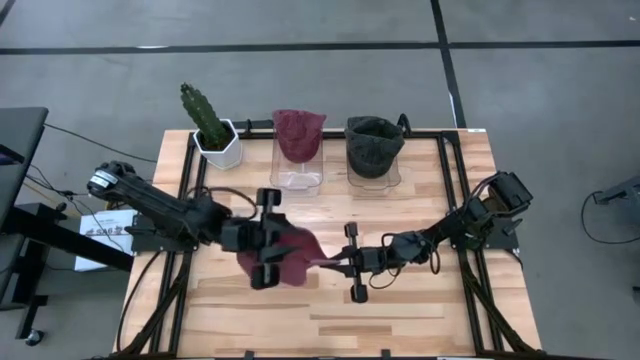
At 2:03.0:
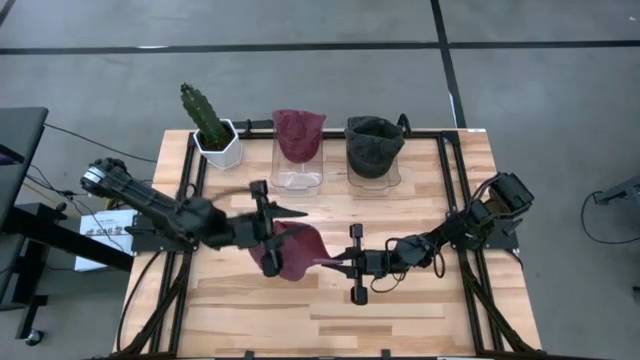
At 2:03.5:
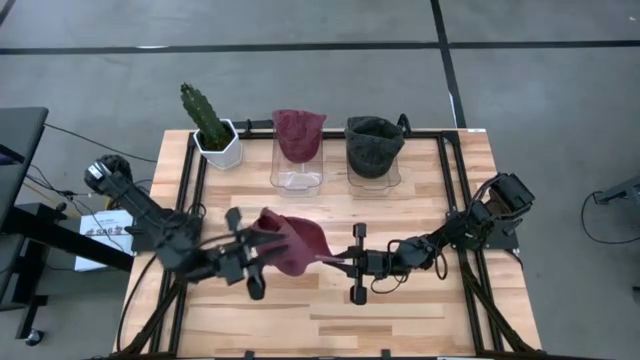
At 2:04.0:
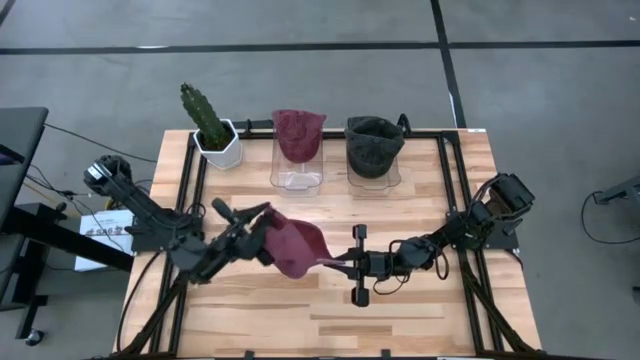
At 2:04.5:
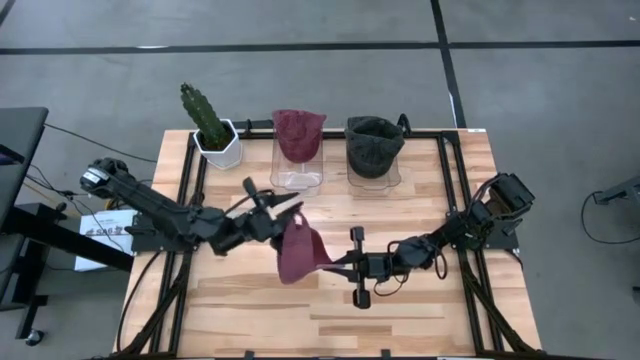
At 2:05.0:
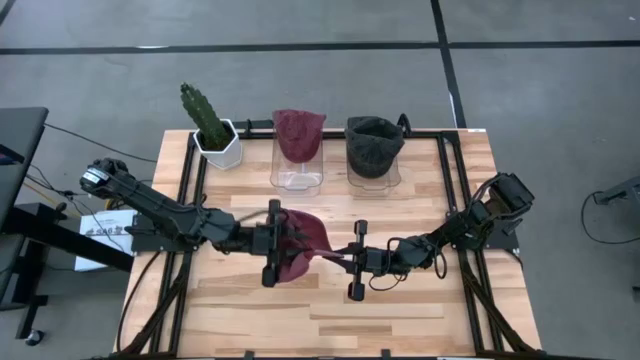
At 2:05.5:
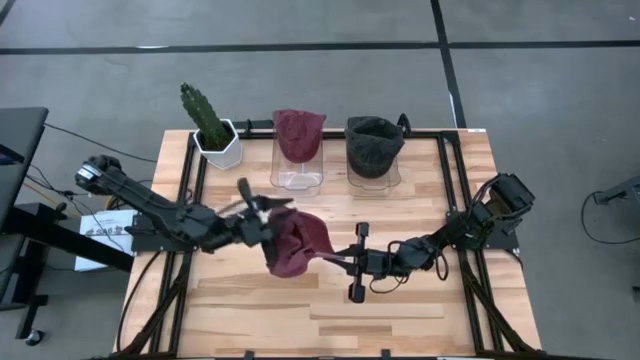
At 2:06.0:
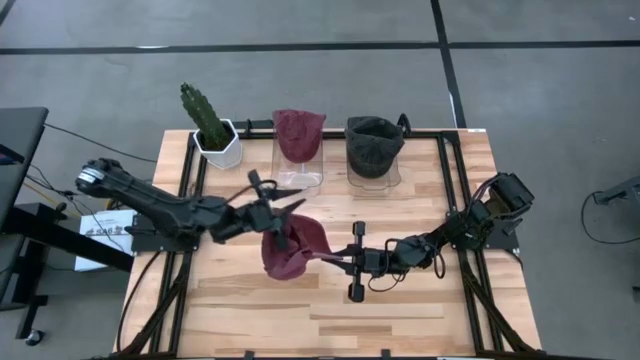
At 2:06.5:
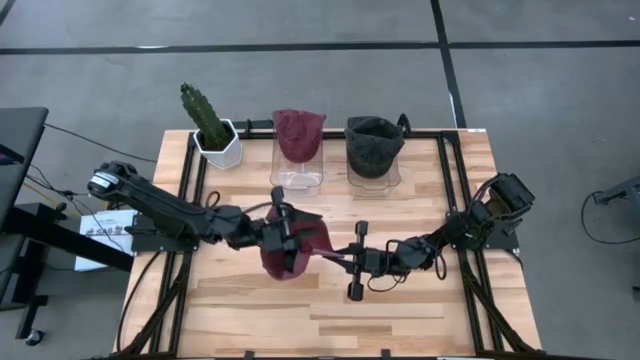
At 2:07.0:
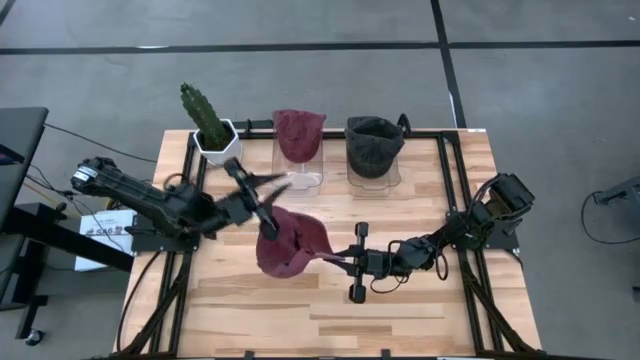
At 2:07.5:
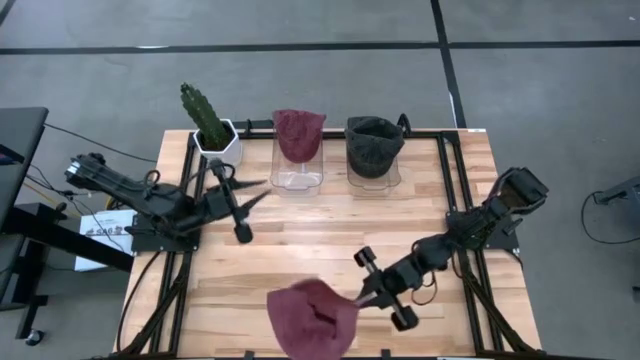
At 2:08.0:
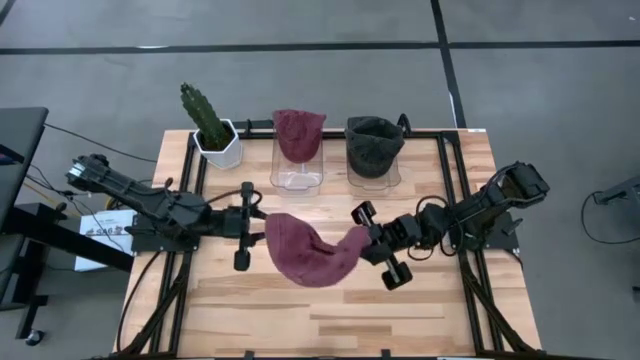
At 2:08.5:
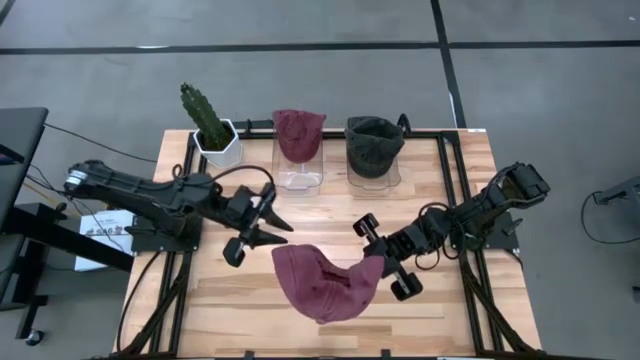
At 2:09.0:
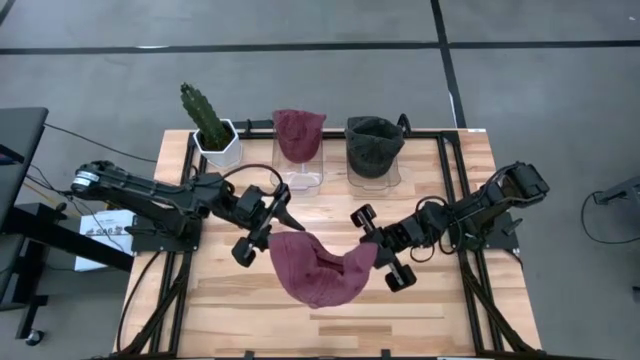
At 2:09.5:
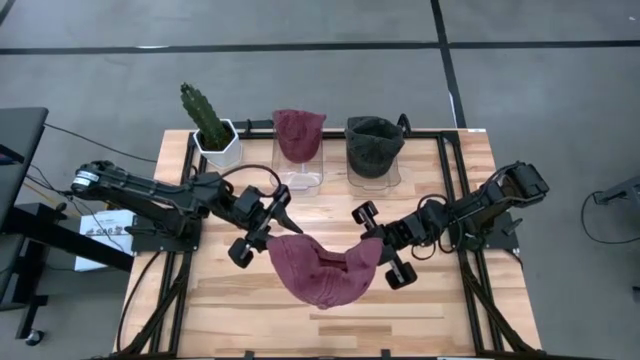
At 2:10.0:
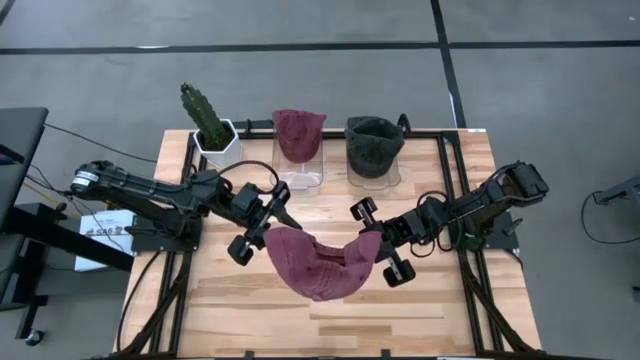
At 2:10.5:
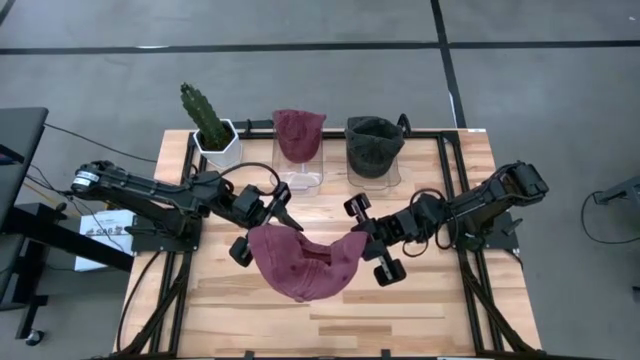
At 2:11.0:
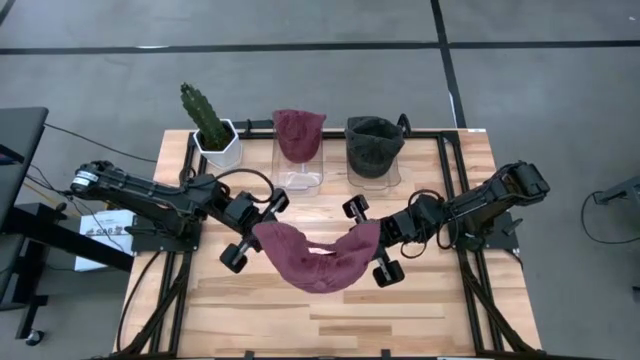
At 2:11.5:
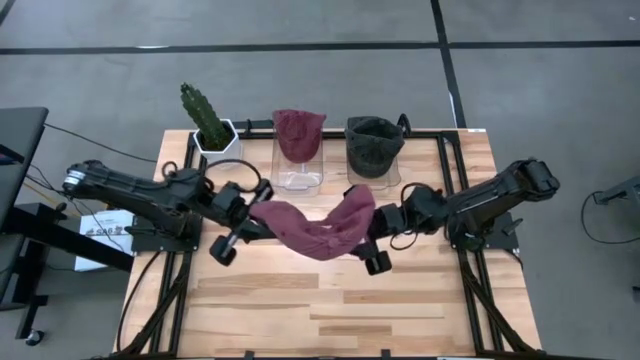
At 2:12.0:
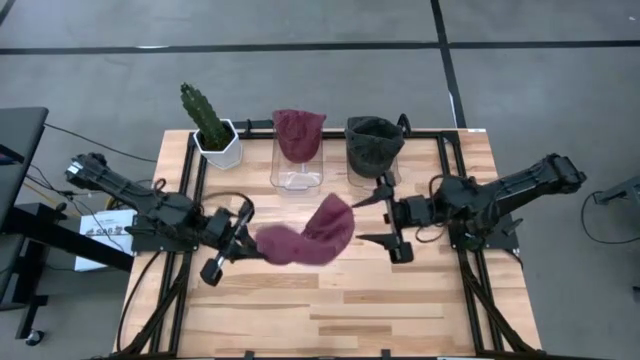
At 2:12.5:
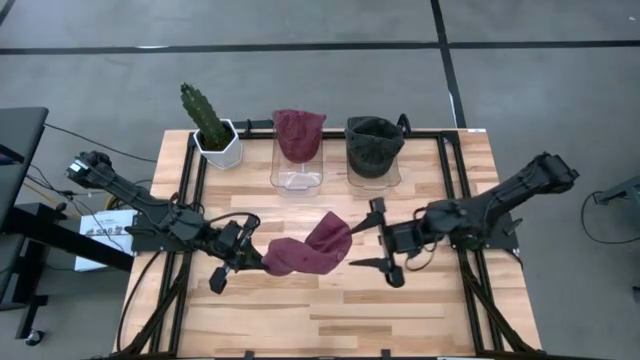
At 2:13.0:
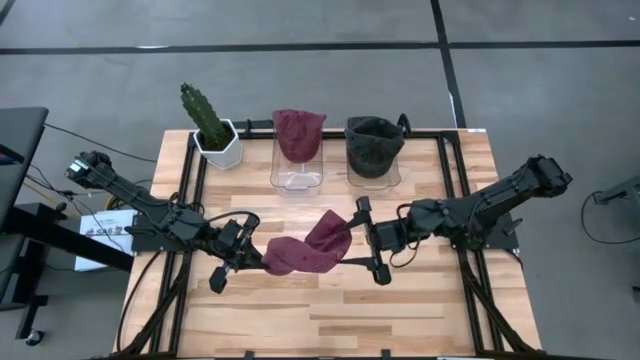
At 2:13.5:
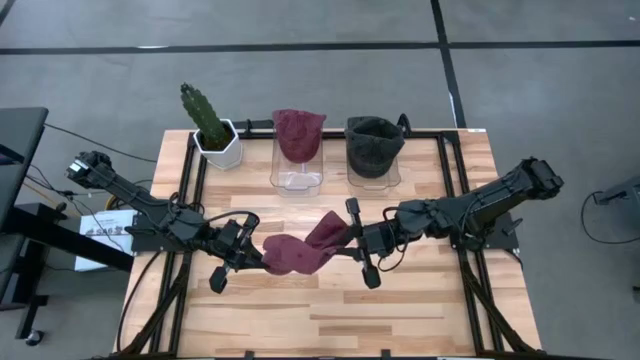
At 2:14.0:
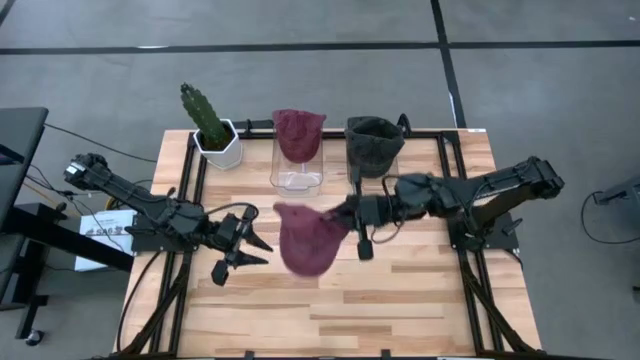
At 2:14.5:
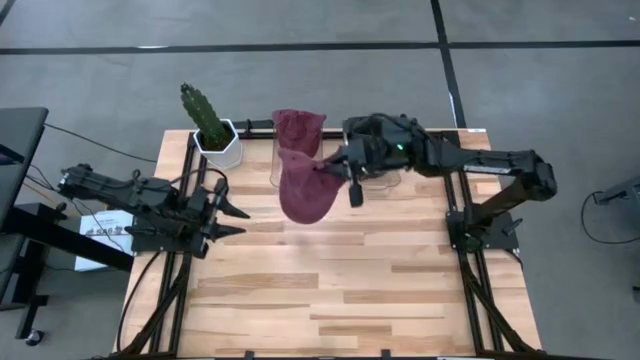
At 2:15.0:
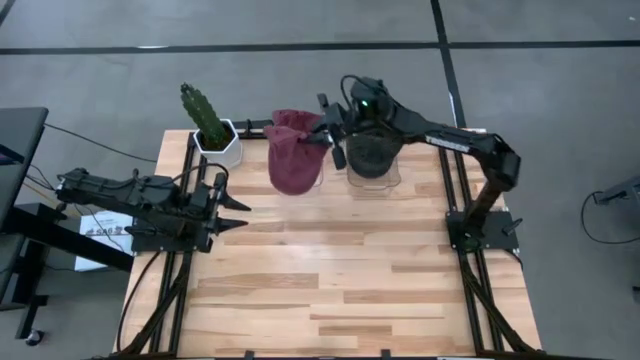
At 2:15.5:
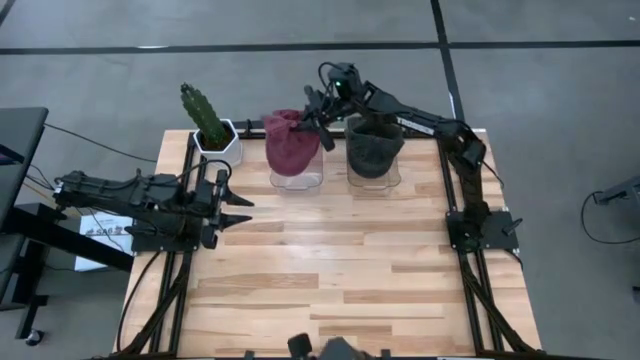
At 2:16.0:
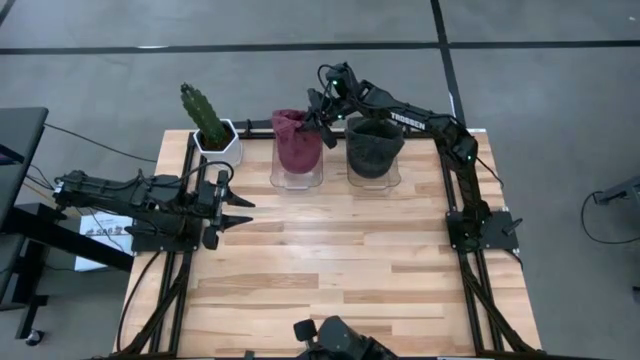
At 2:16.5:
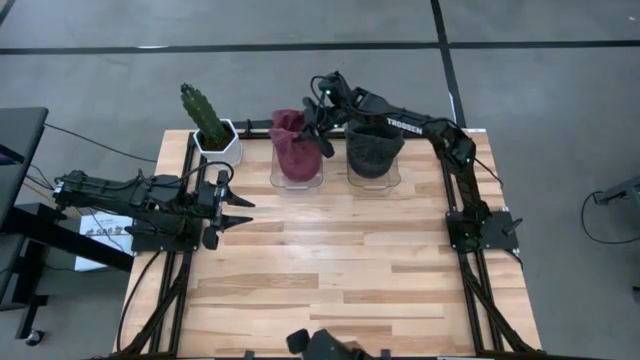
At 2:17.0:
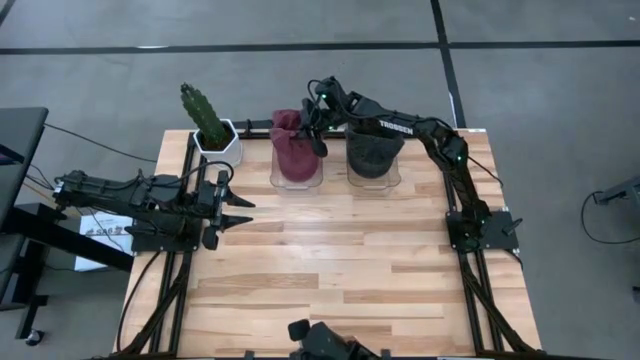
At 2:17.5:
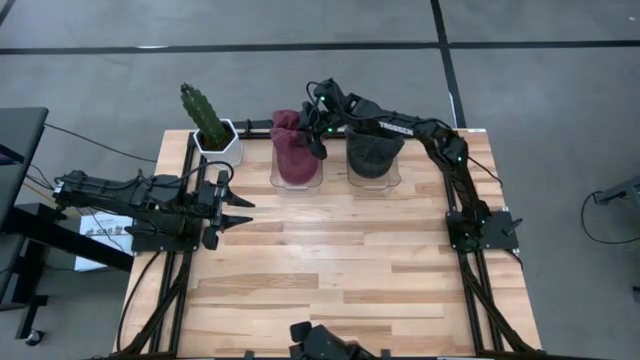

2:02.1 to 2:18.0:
Task: Pick & Place hat
Put the red cap into the transparent bin

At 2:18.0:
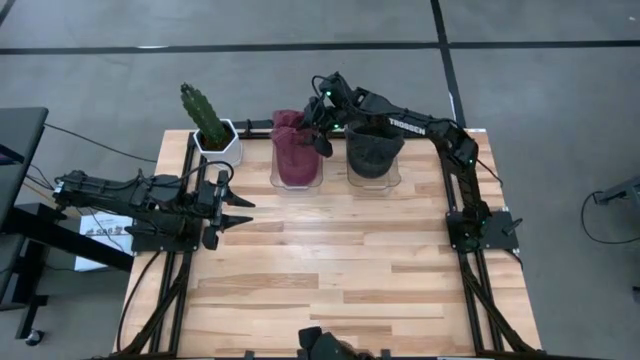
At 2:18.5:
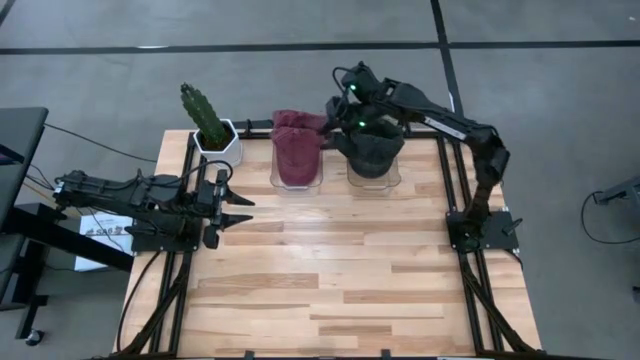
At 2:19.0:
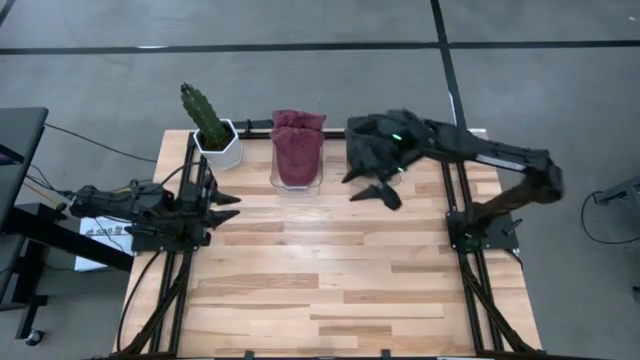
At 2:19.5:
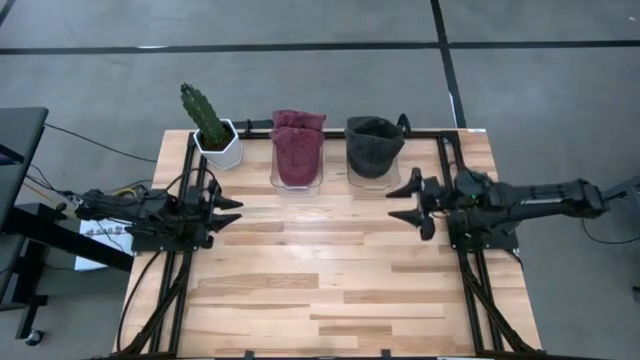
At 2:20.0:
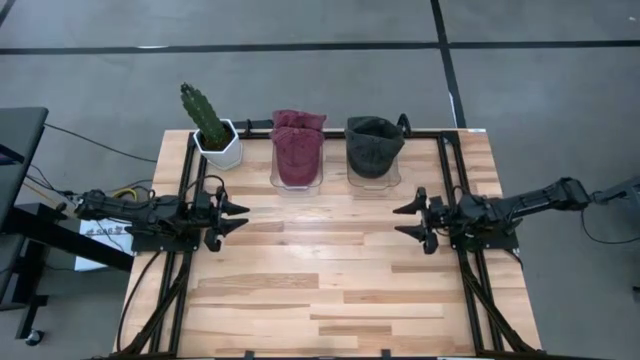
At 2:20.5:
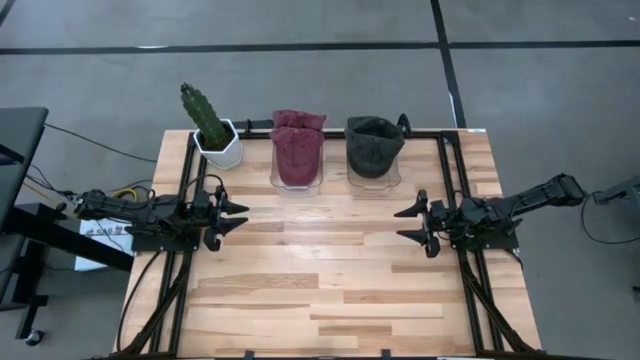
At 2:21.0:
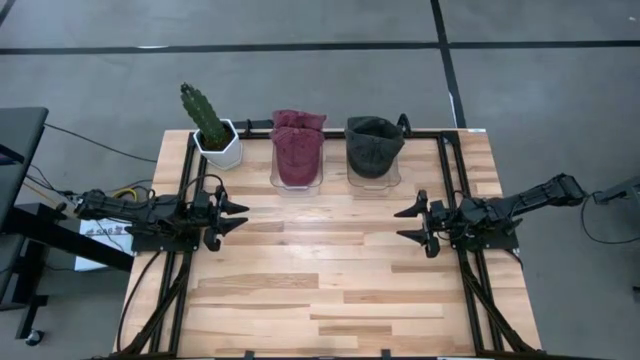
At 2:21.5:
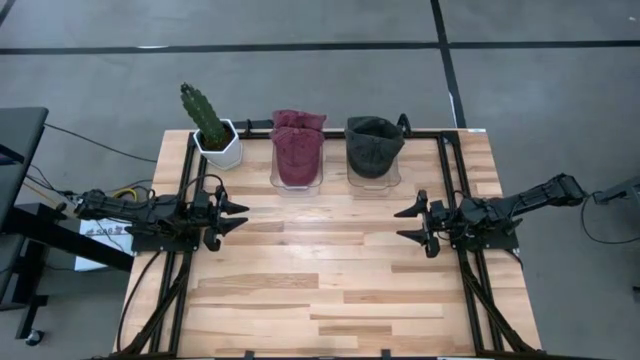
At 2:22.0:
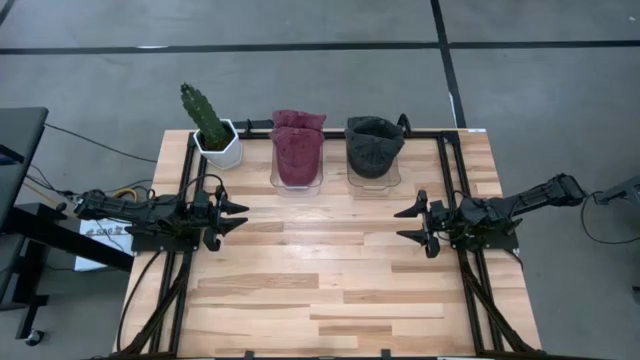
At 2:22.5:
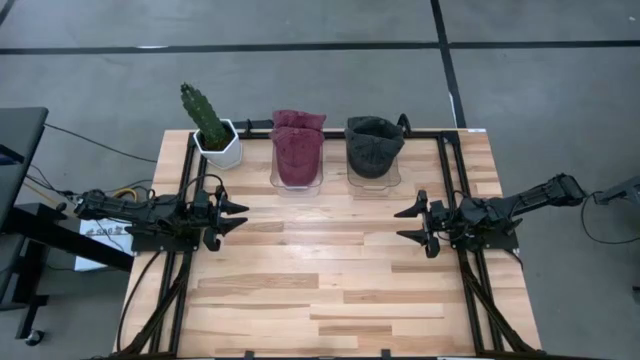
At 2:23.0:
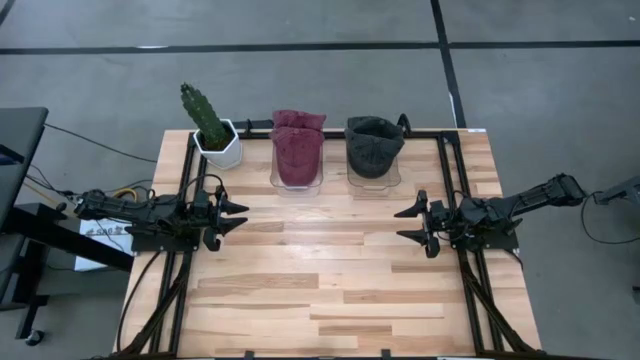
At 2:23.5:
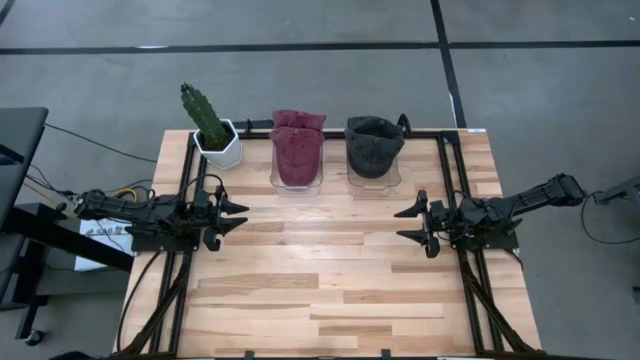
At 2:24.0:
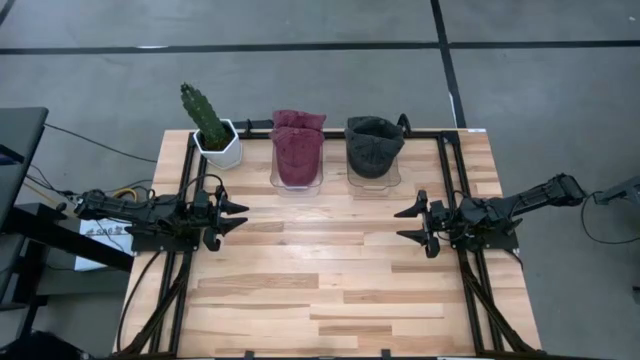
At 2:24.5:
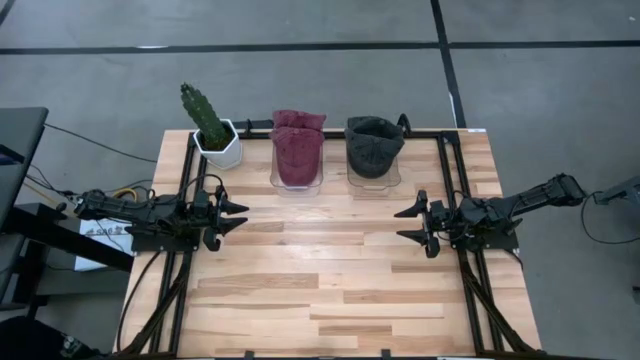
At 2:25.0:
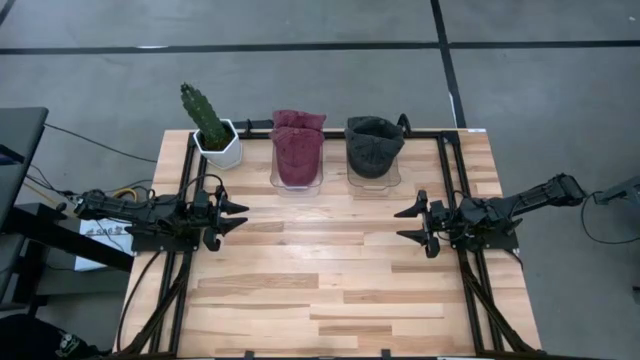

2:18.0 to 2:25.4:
Return to Home Position
